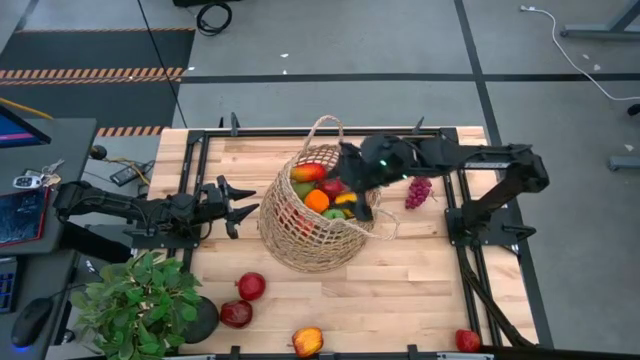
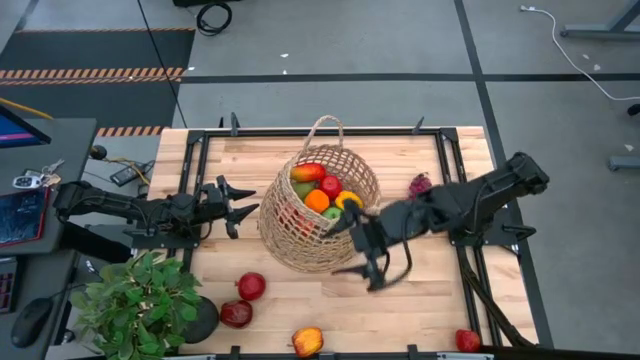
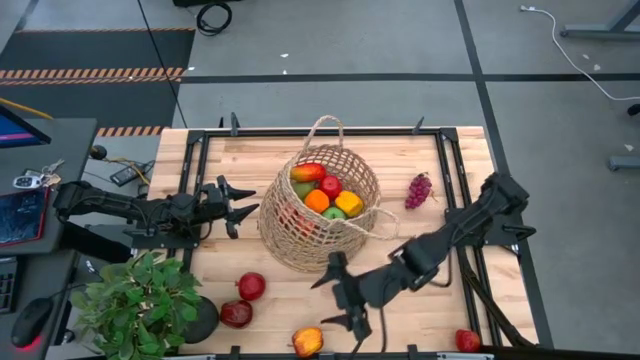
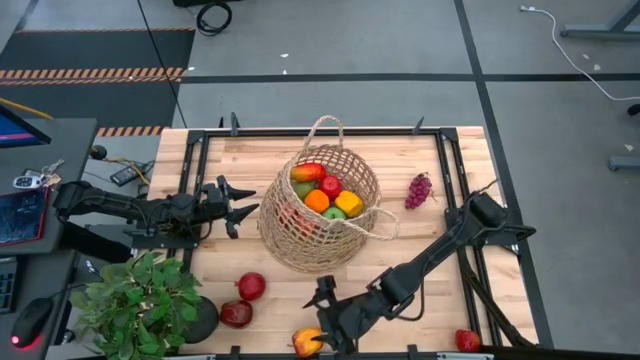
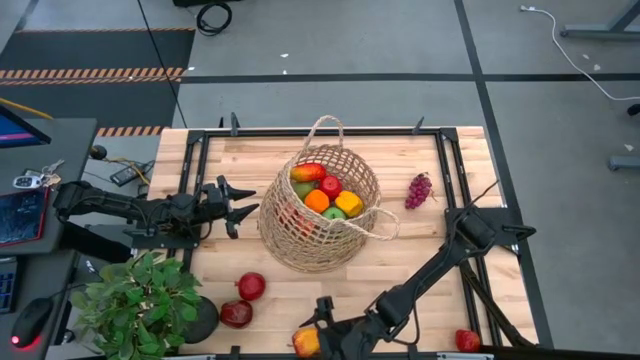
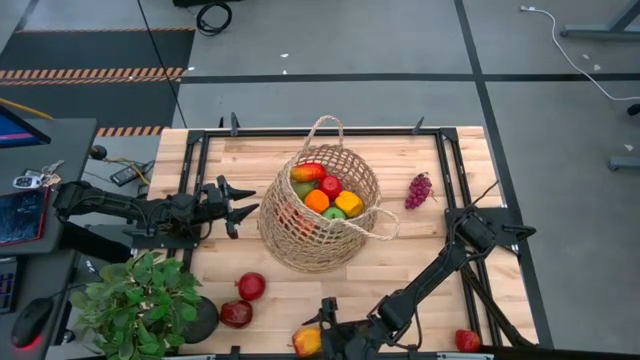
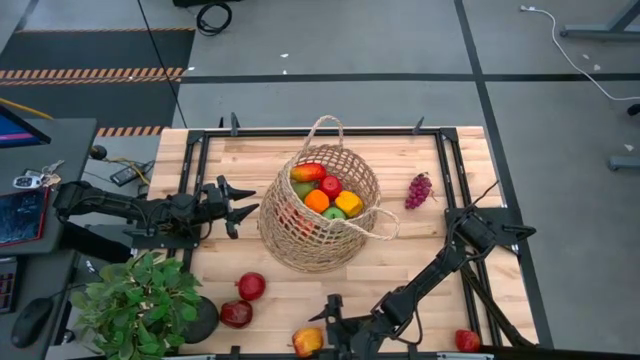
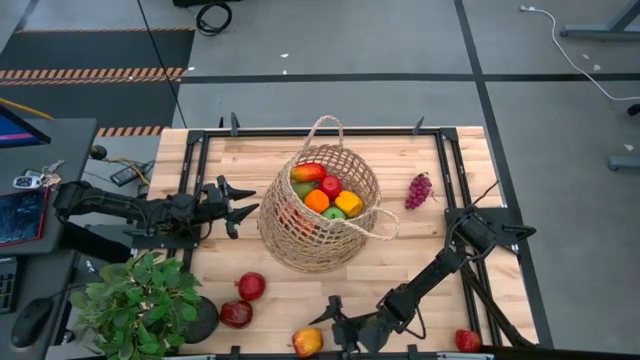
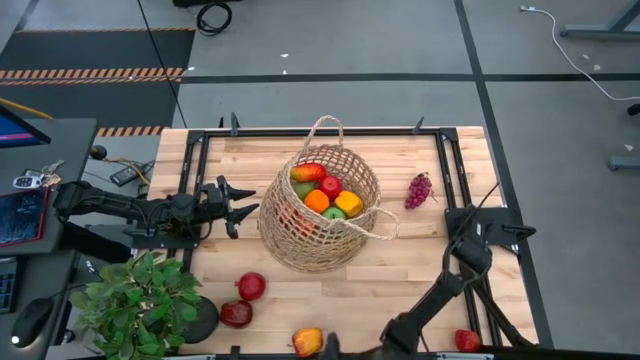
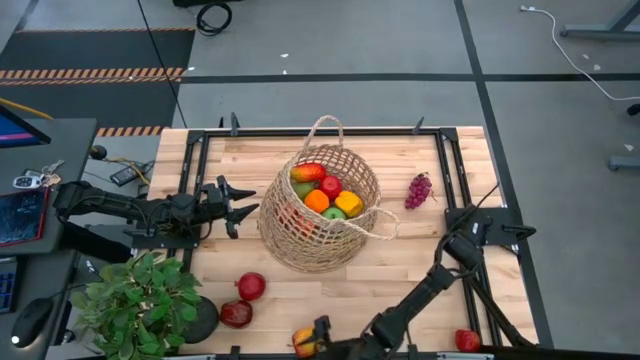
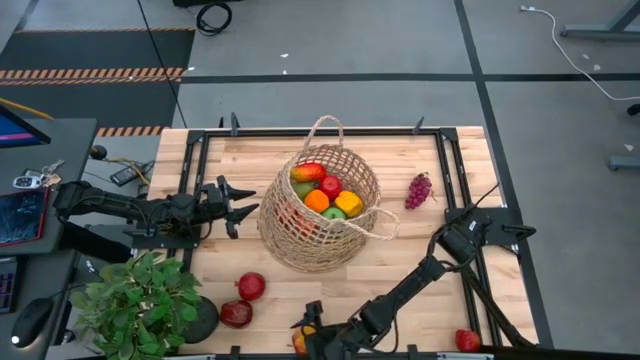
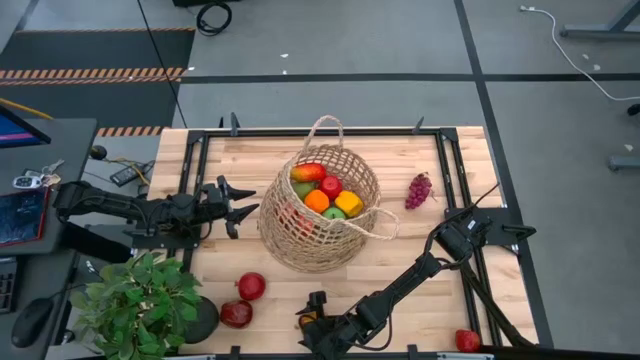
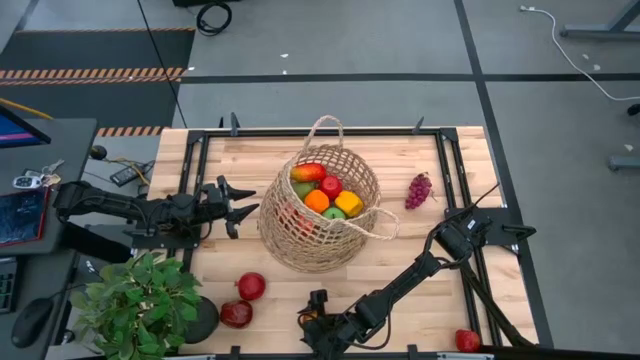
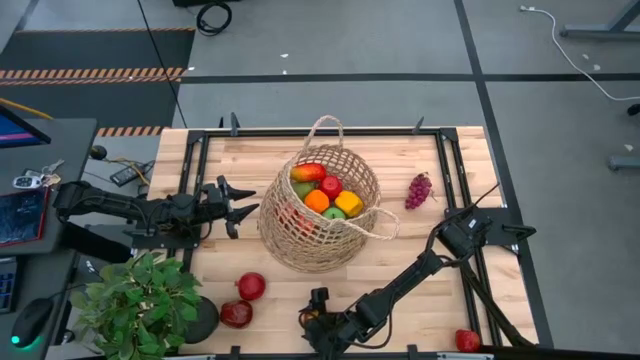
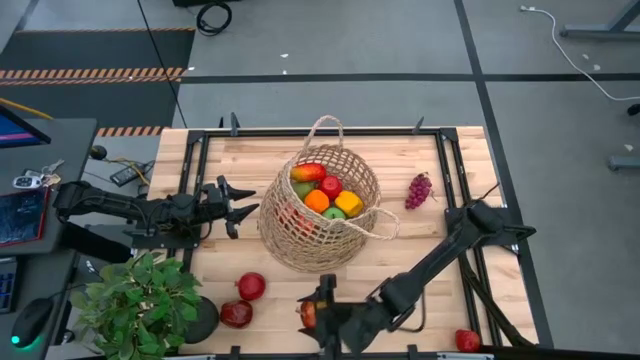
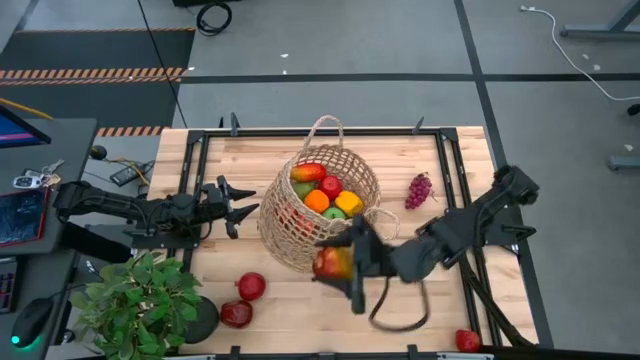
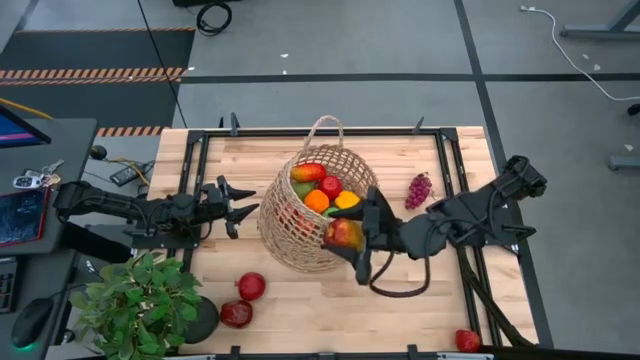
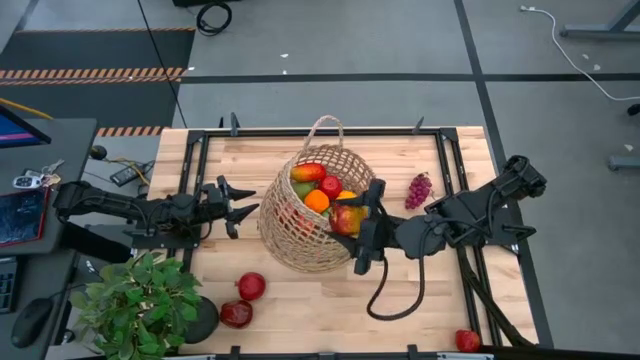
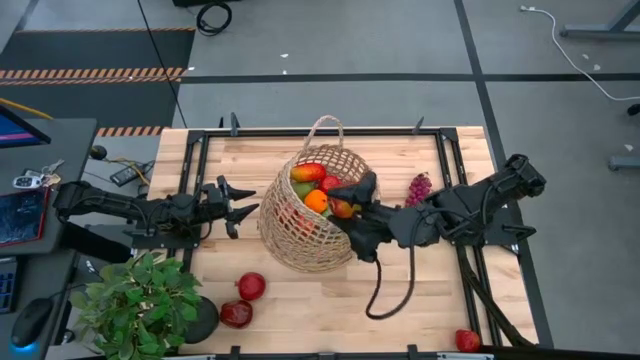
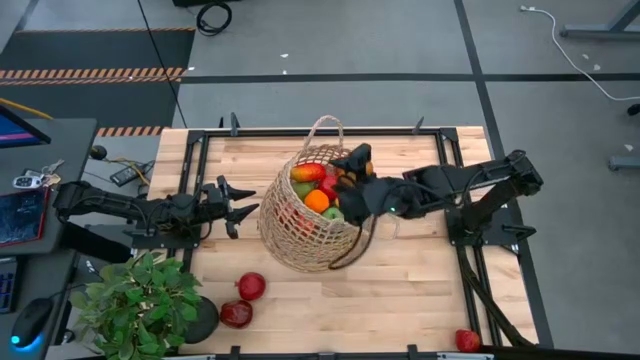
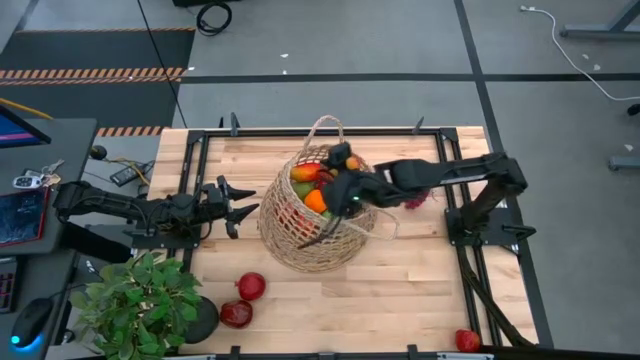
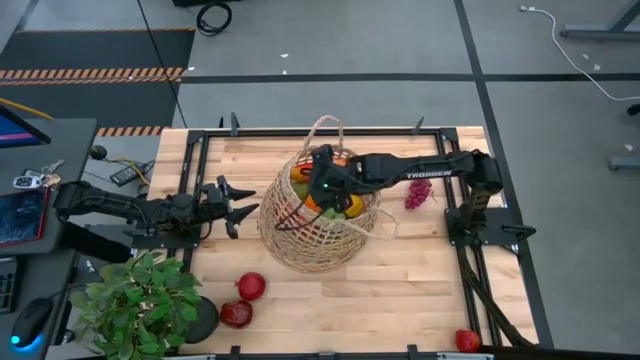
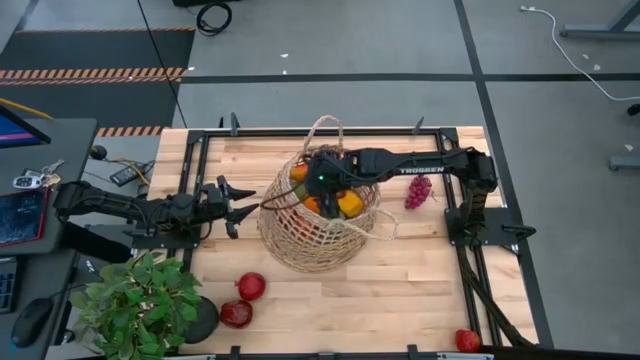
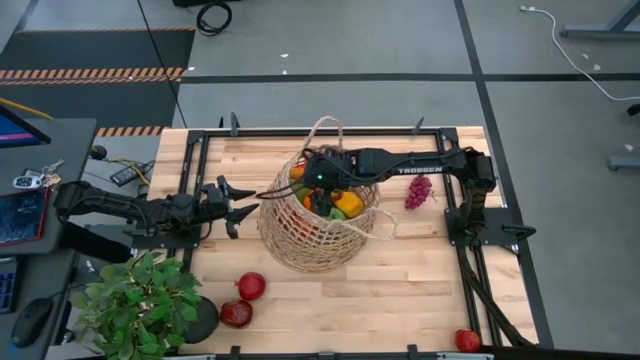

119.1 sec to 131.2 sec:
Task: Build produce basket
Put the red apple into the basket

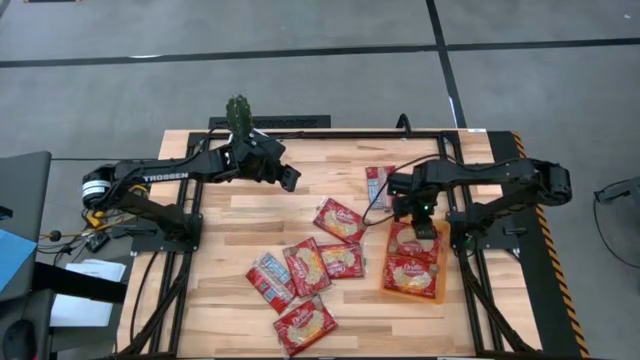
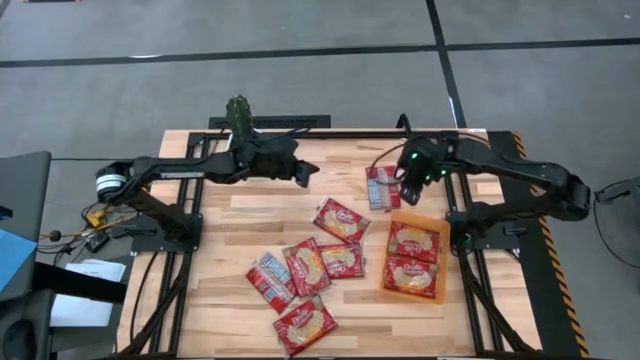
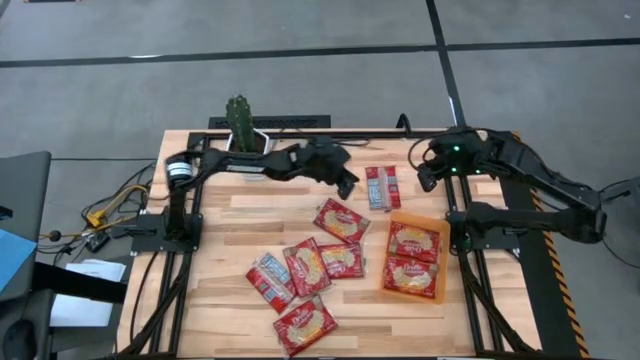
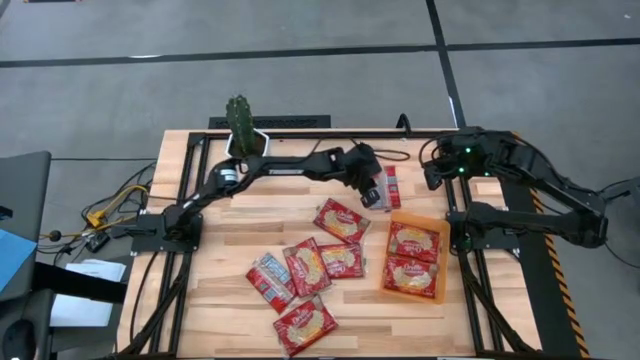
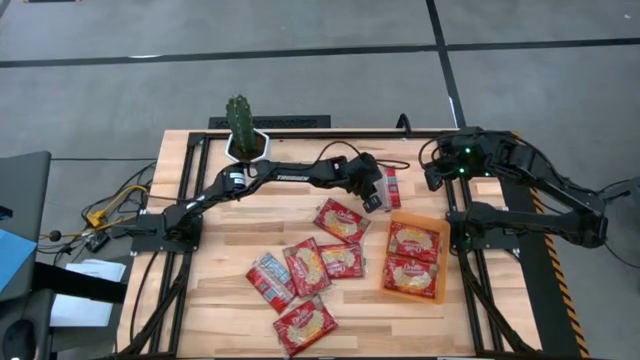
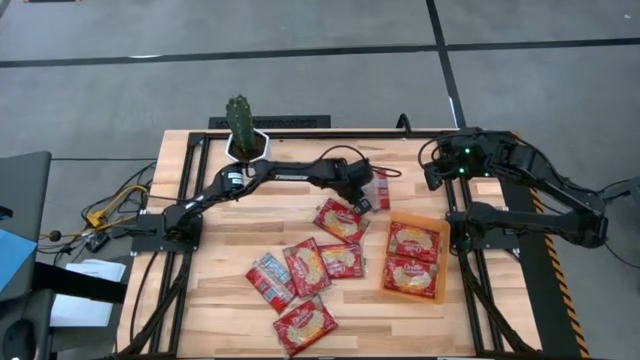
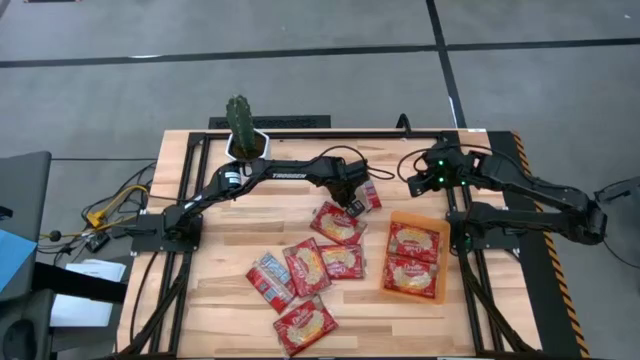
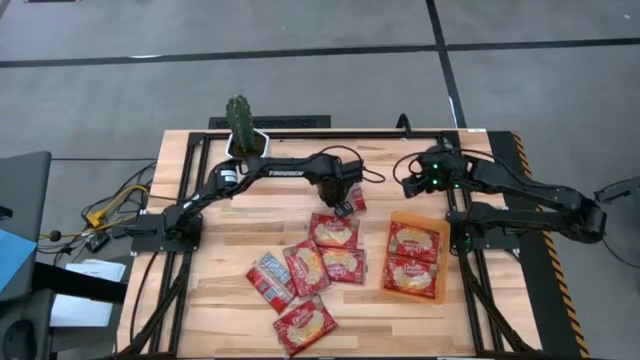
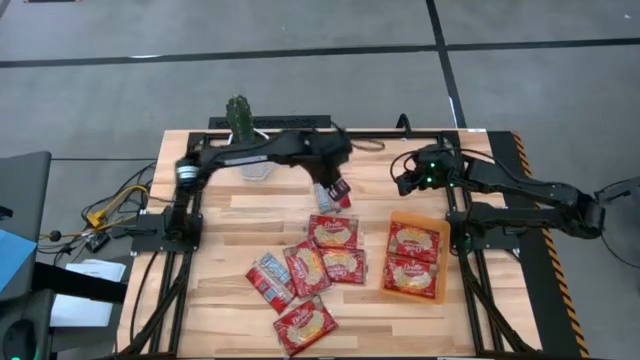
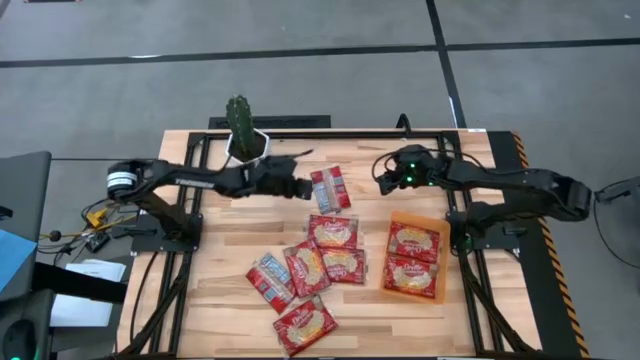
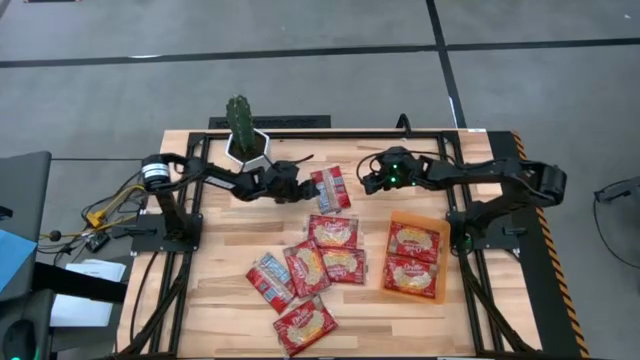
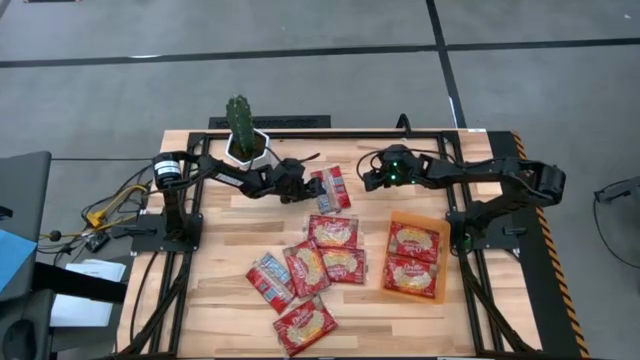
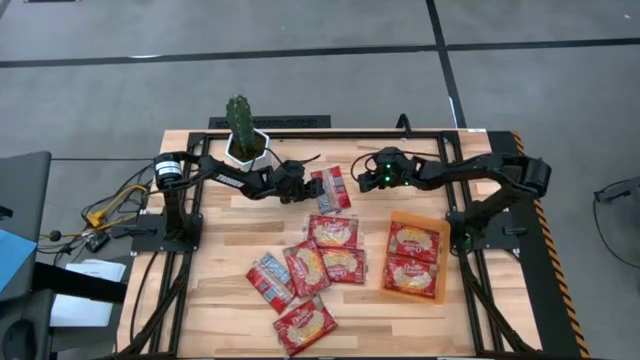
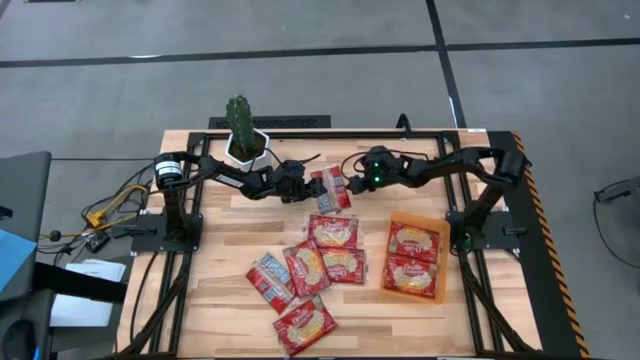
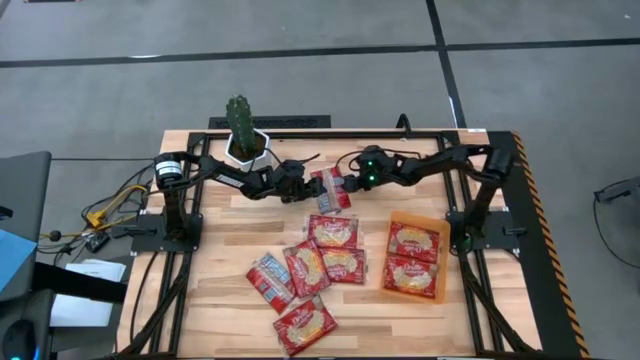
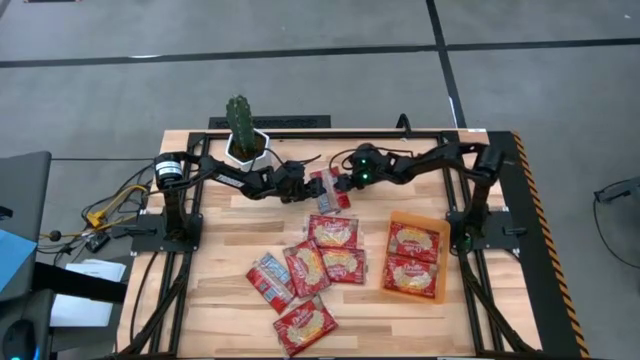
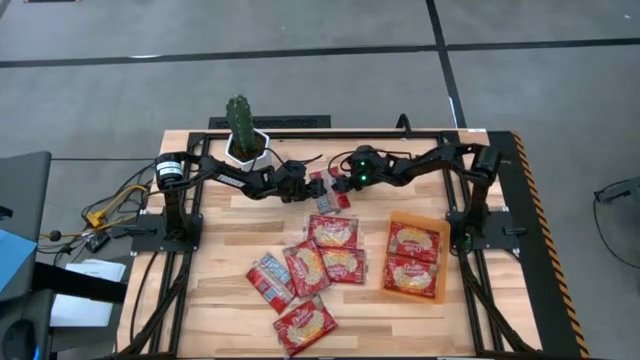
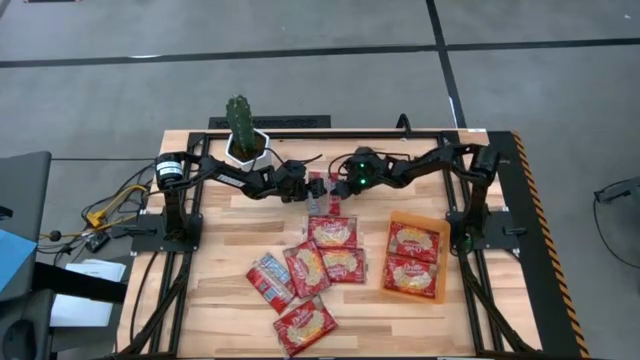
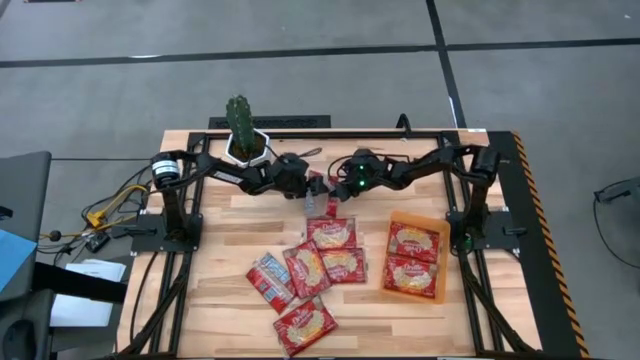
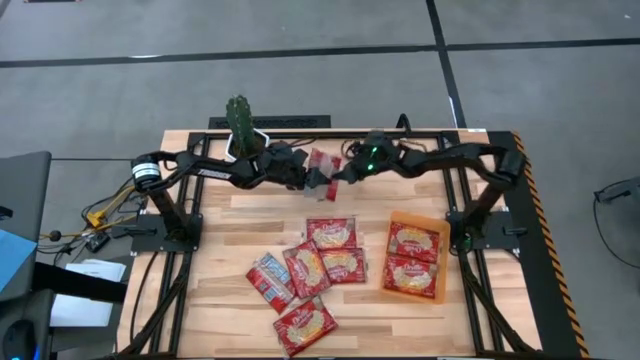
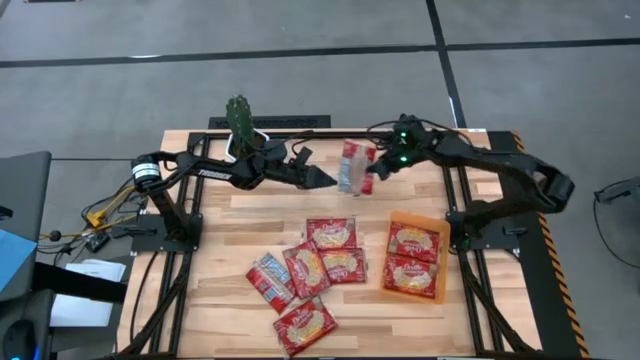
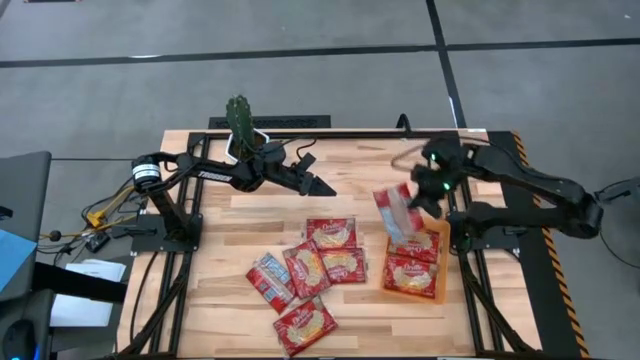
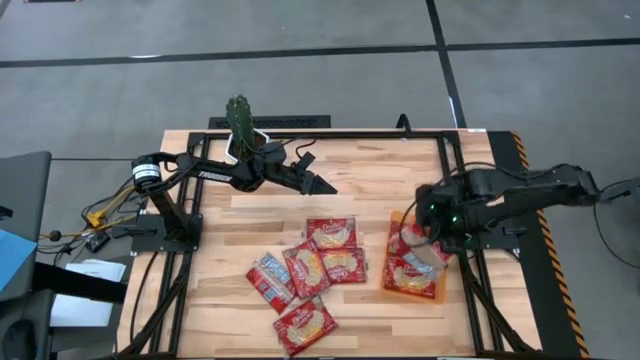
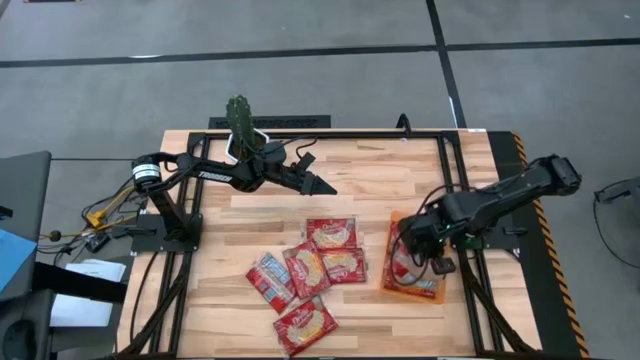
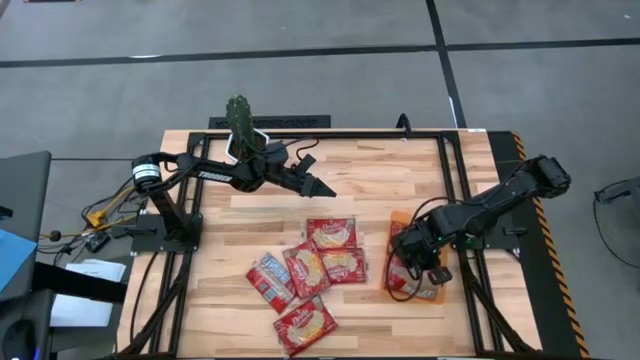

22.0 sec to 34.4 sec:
Task: Sort popcorn bags into baskets
Put the popcorn bag into the orange bin
